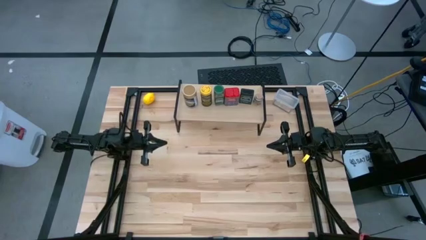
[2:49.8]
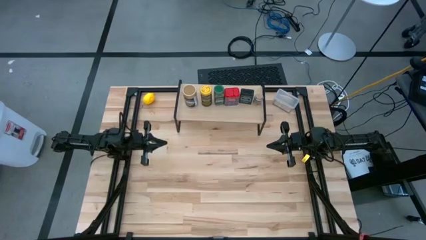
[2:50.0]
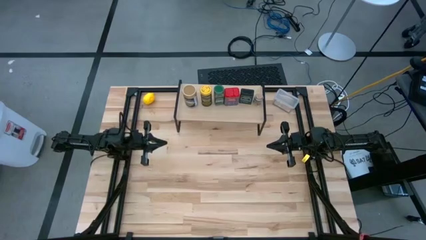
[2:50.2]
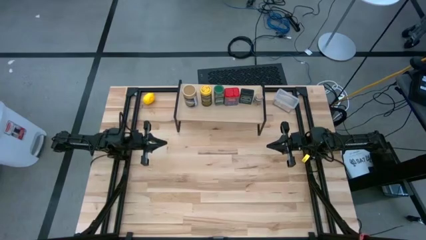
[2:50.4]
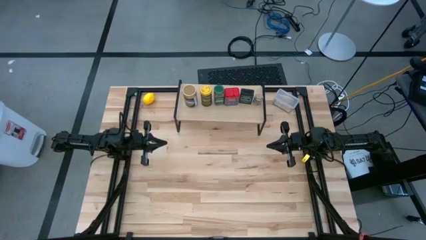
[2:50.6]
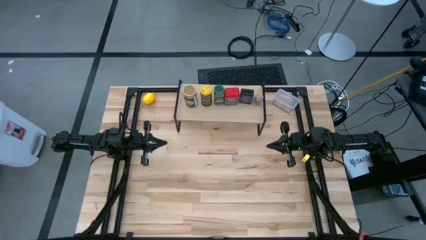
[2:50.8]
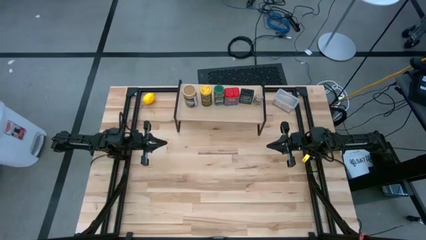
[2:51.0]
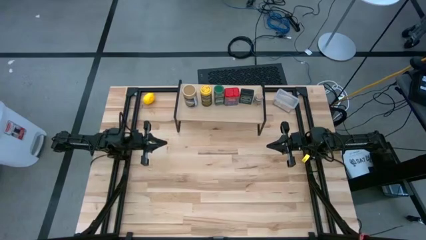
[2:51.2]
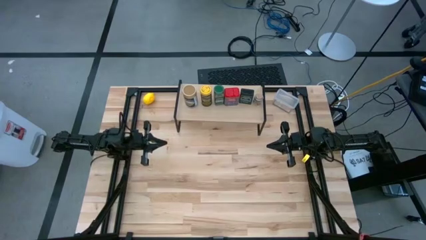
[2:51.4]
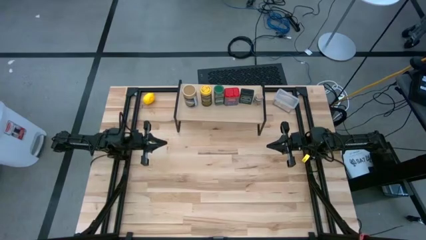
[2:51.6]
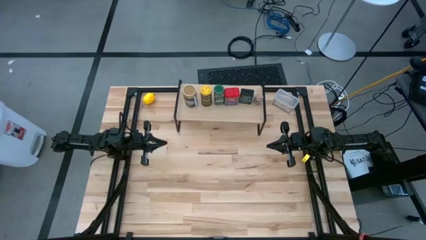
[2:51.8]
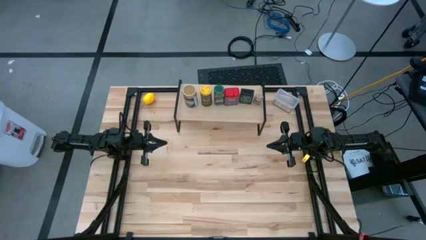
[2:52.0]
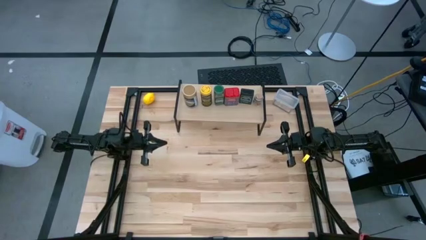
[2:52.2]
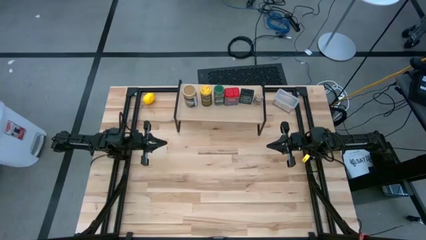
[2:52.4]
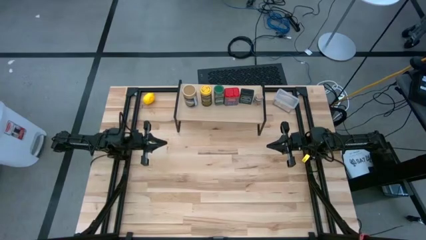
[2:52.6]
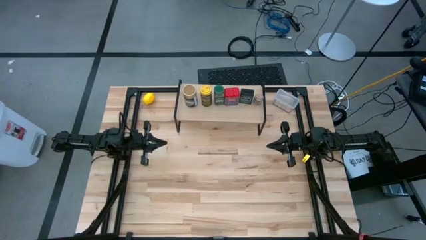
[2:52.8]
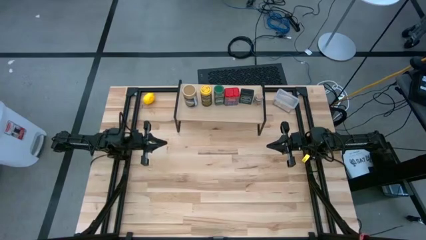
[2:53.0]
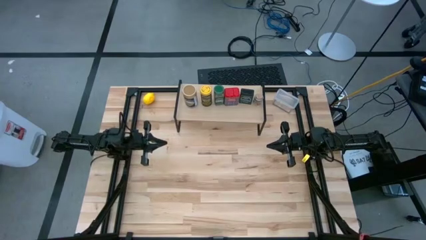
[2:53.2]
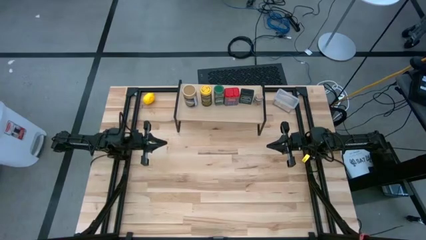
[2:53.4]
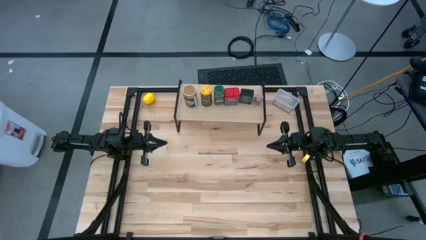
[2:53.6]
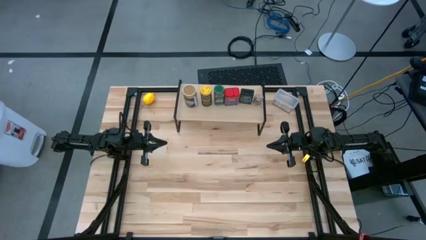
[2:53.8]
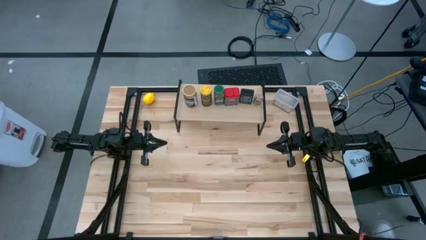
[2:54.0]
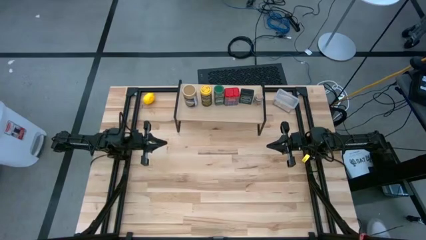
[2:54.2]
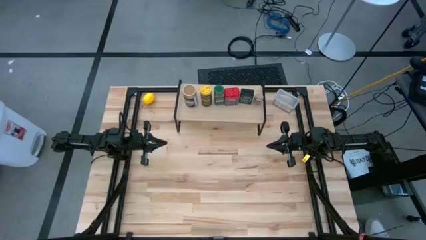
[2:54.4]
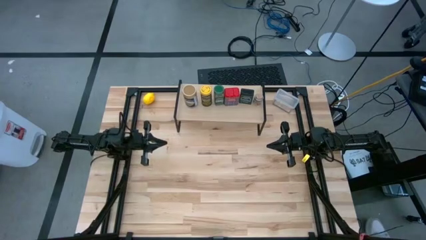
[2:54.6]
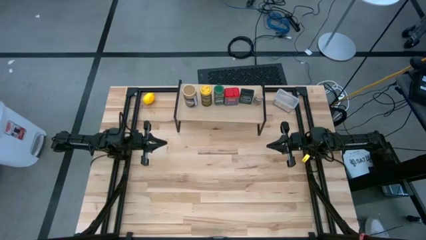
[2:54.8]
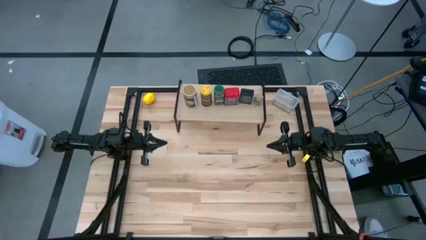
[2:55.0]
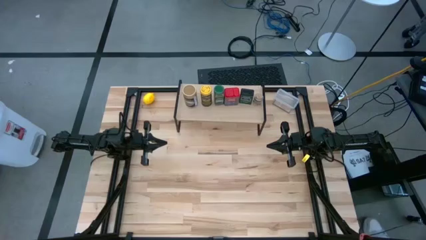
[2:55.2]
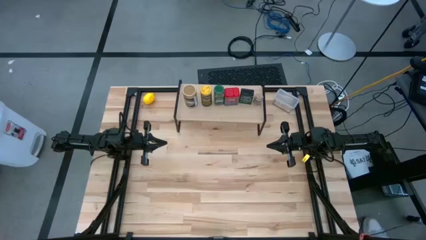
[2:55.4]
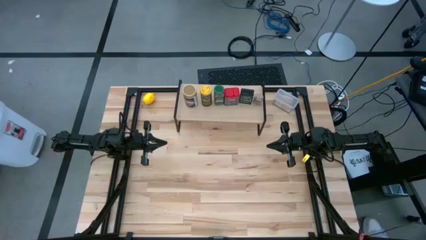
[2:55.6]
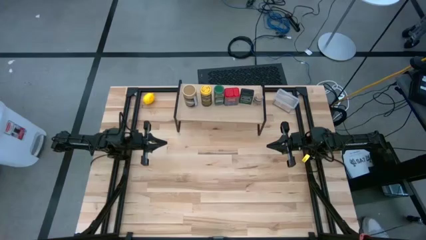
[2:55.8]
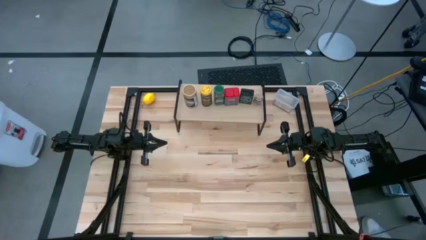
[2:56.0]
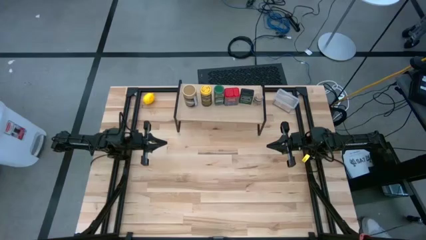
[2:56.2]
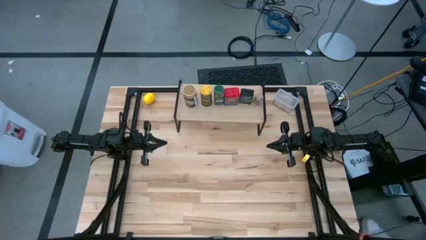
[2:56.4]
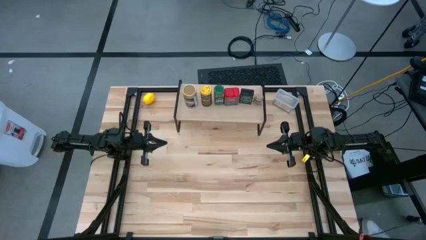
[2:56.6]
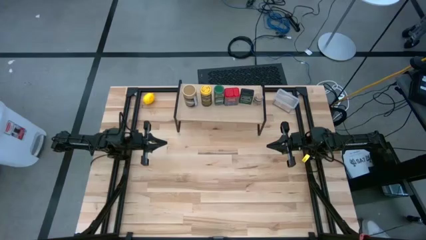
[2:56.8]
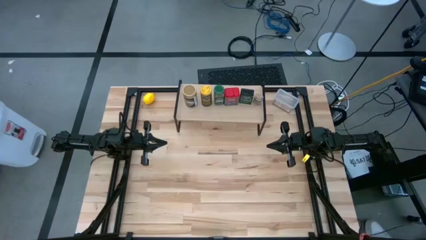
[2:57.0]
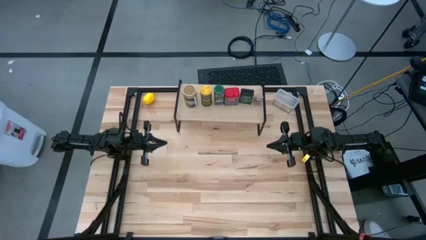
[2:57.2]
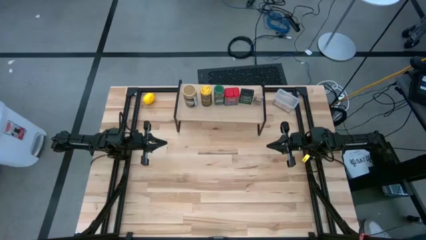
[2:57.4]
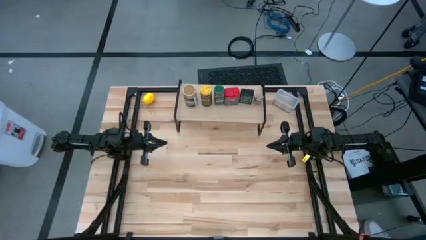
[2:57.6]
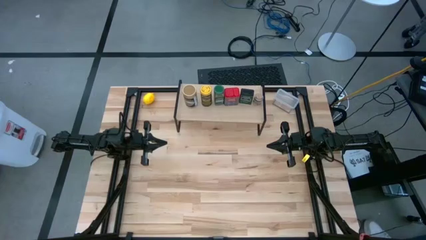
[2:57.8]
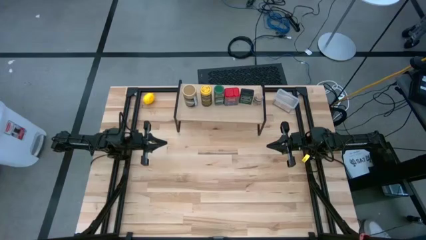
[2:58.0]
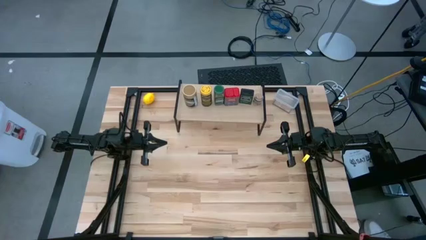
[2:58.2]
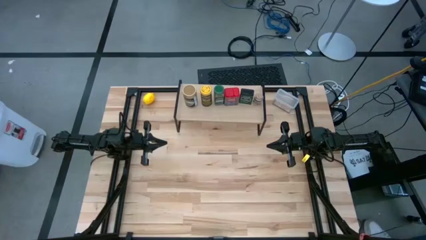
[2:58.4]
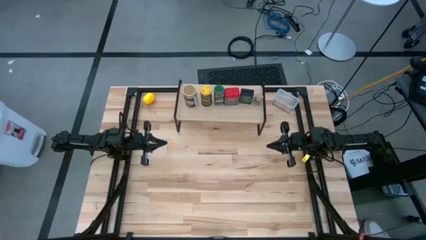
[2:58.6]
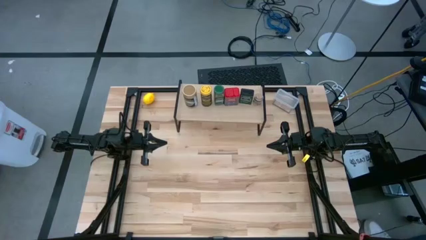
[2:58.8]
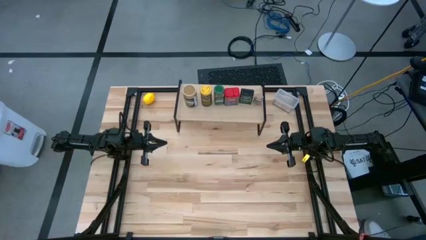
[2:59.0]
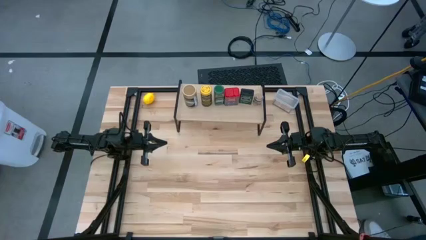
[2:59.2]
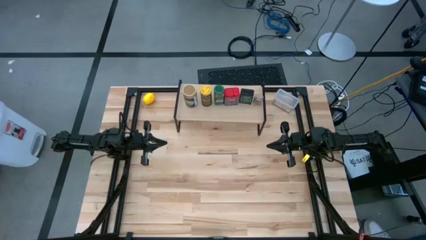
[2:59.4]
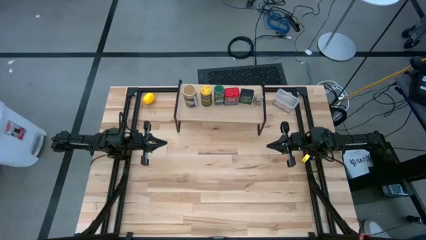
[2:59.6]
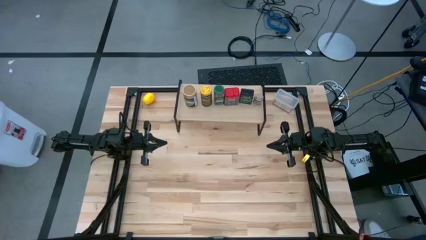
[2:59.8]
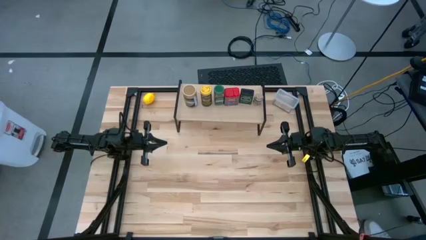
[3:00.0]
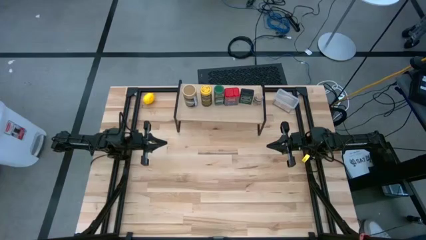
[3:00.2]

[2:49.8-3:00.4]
Task: Shelf spices
Return to Home Position
